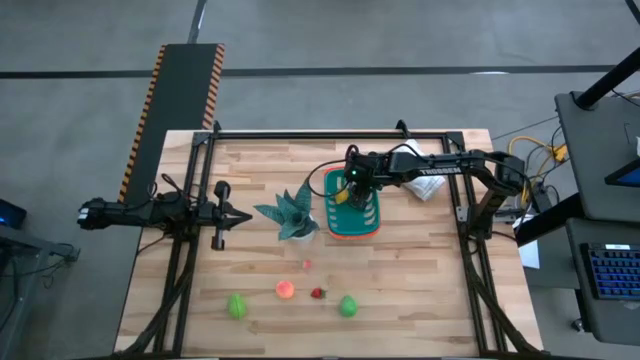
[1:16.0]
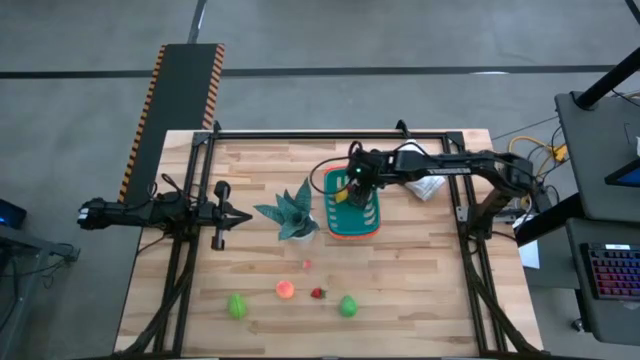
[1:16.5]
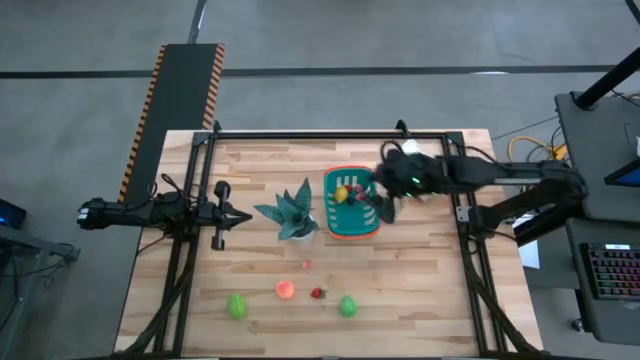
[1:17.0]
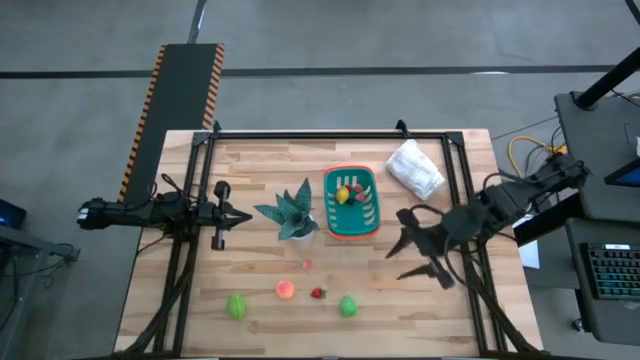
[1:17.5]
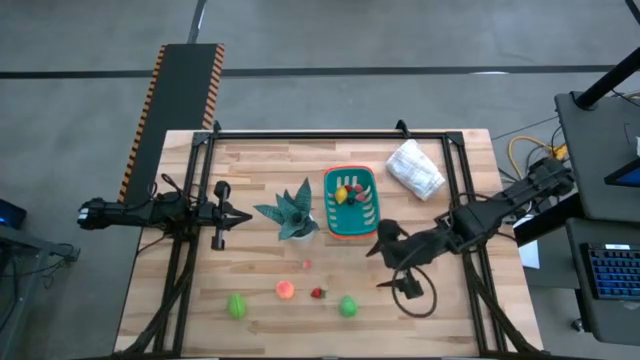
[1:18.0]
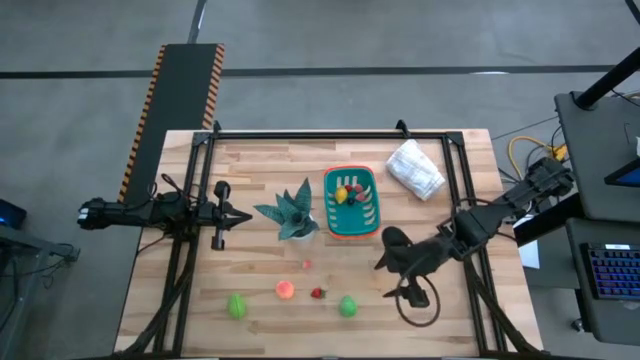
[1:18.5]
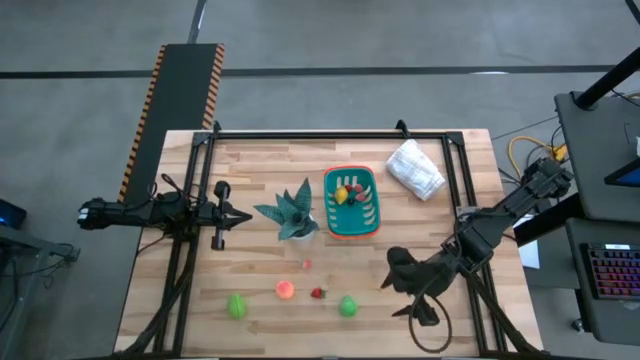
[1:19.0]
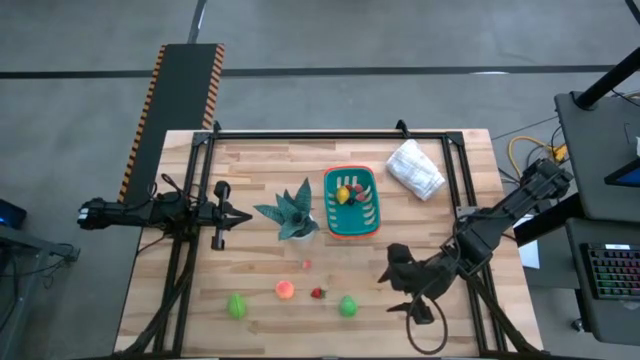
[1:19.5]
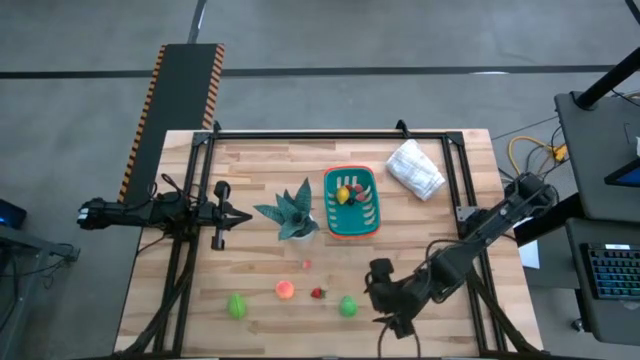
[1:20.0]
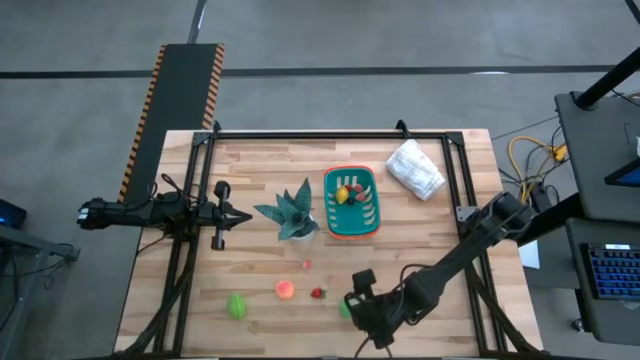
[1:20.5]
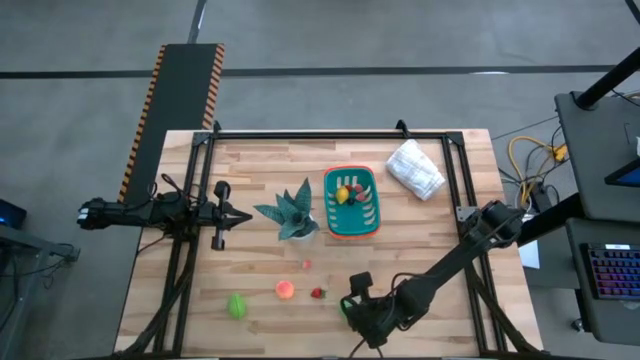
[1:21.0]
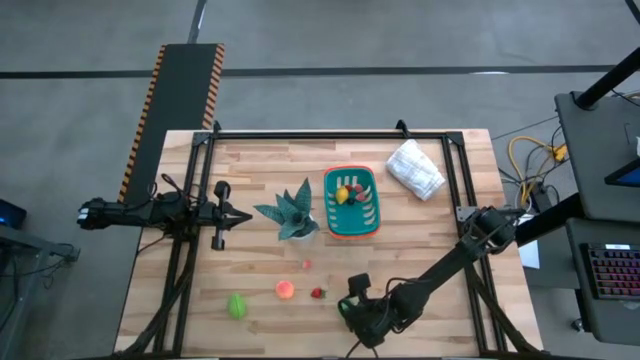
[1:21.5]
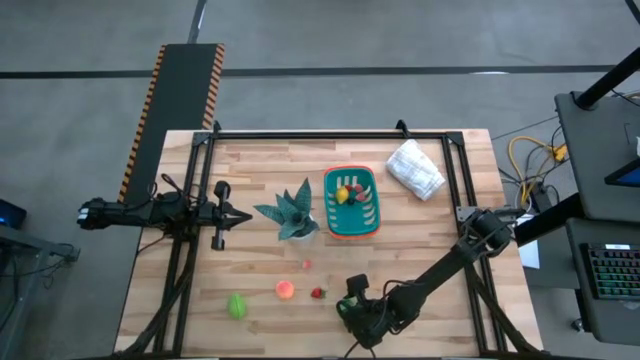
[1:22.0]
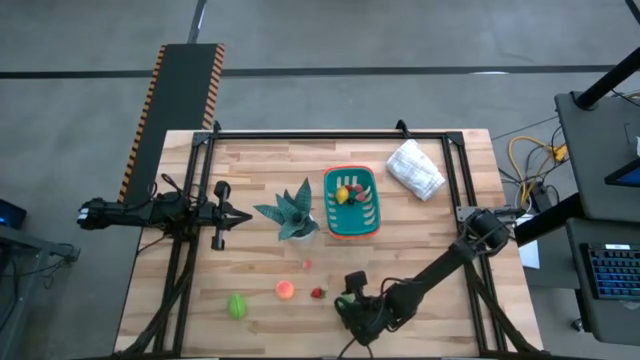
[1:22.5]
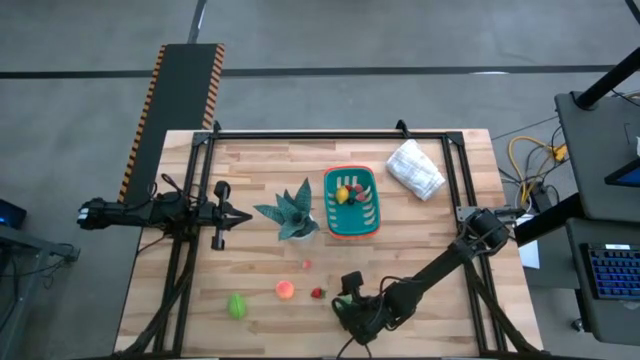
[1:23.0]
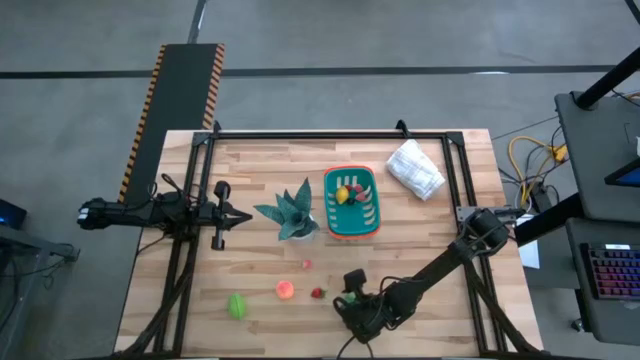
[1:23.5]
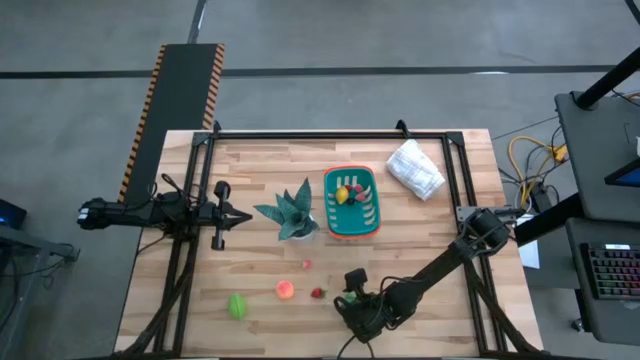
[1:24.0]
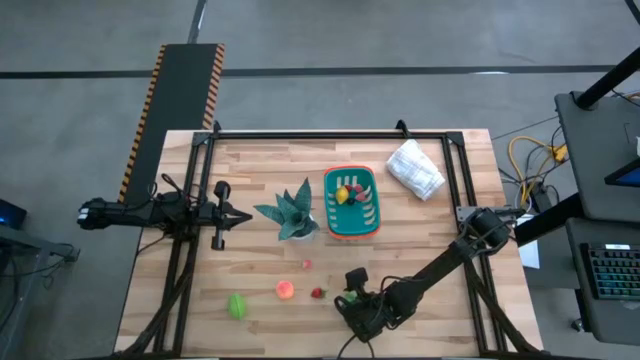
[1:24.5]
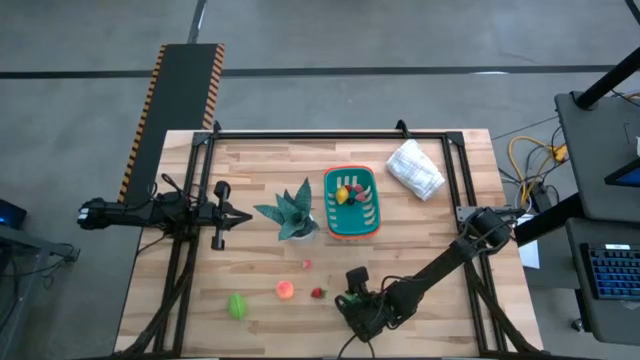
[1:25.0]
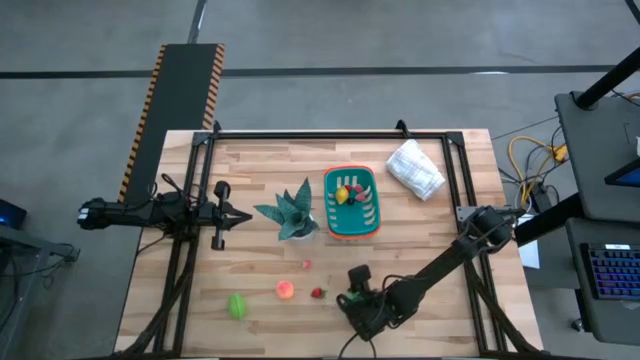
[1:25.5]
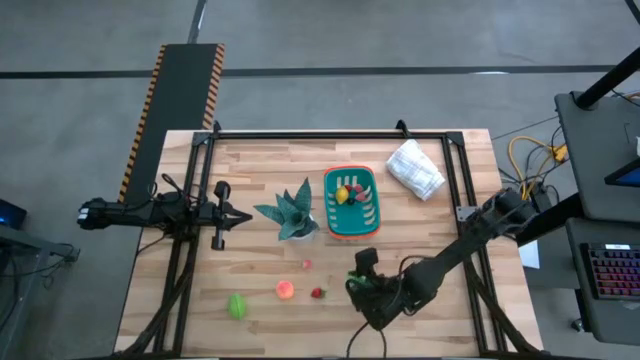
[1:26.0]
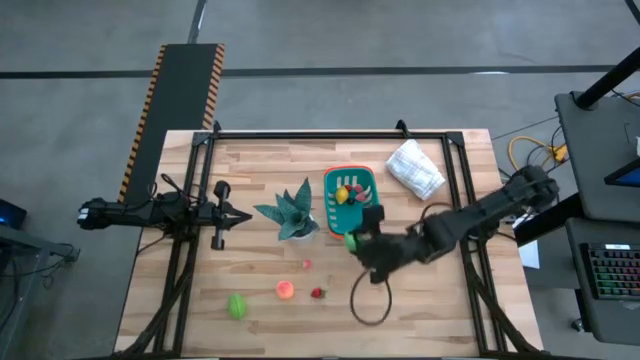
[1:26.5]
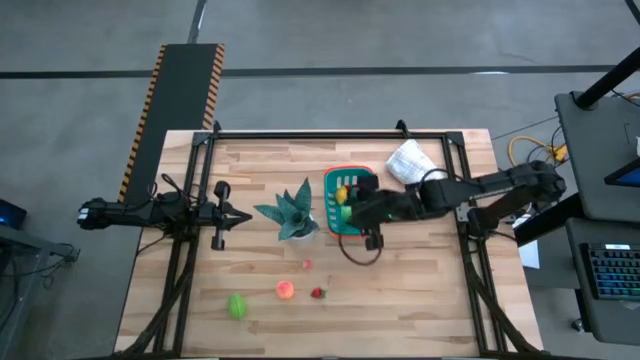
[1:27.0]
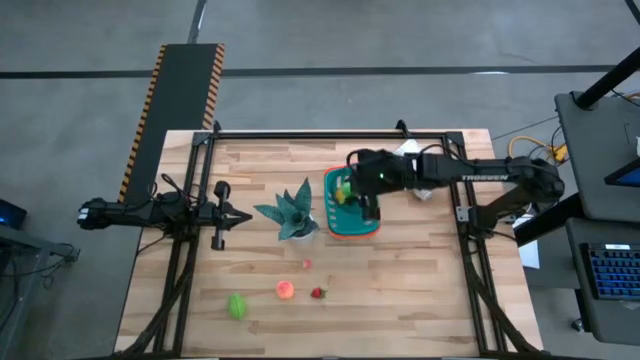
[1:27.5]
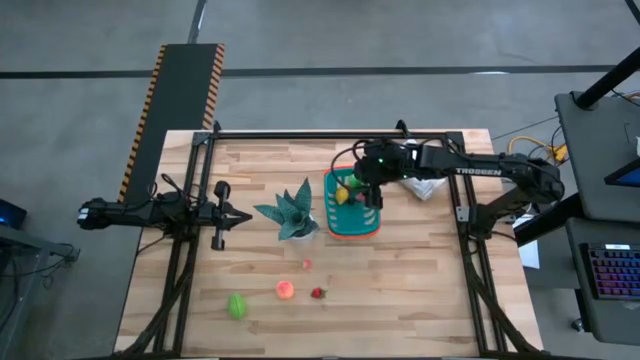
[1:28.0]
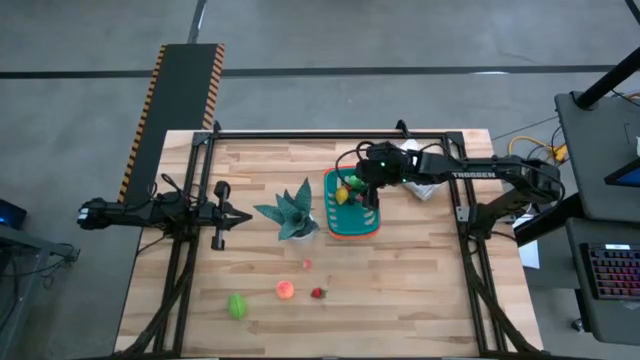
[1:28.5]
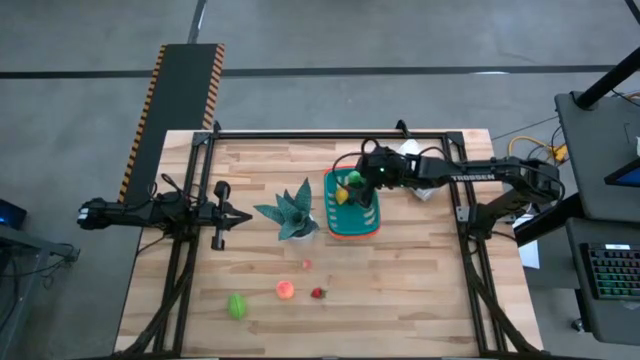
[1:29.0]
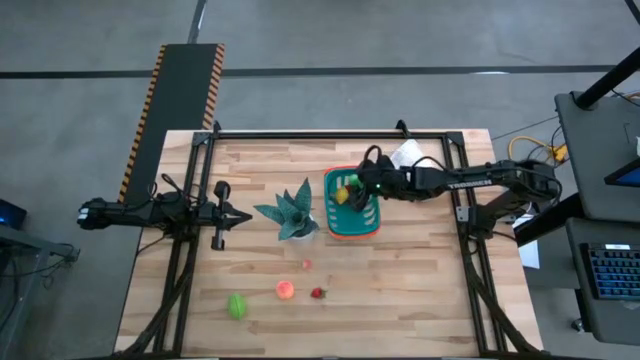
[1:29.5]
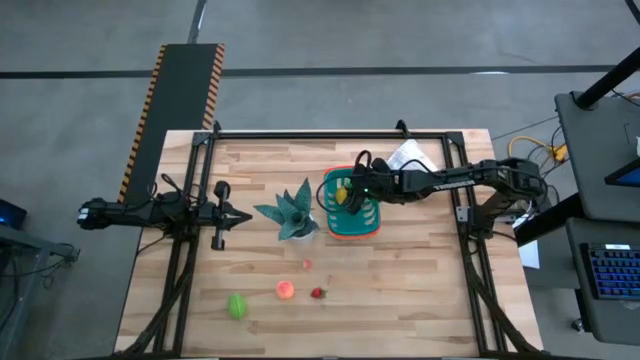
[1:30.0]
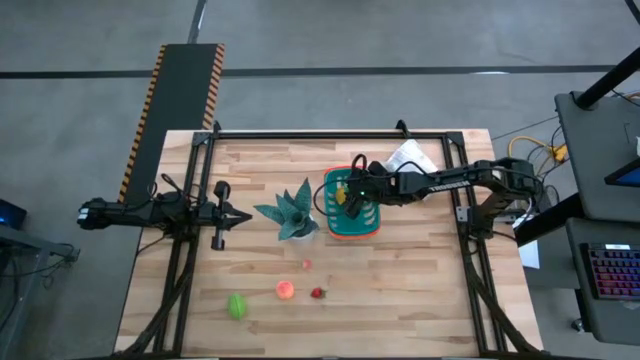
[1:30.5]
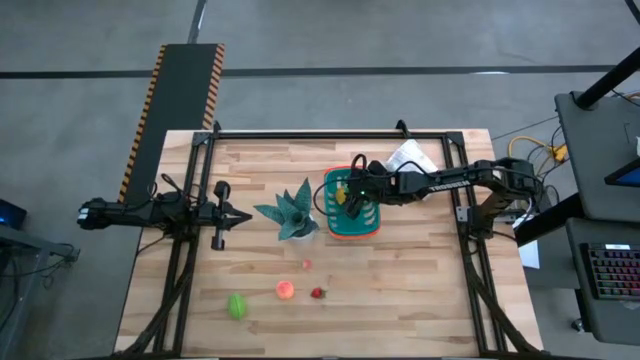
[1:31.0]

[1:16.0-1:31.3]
Task: Build produce basket
Put the pear into the basket

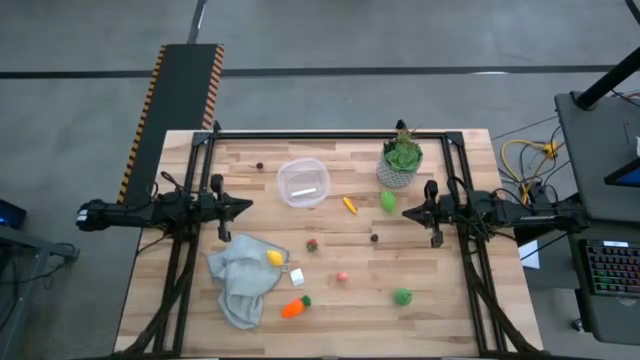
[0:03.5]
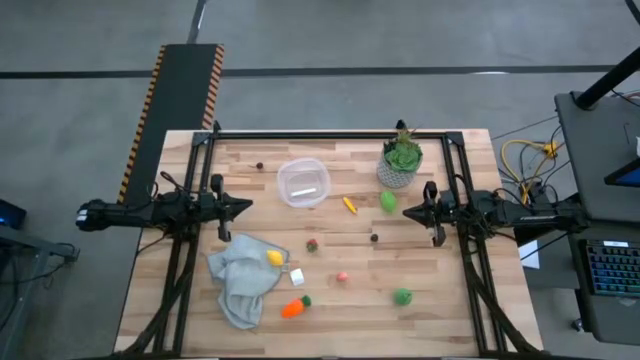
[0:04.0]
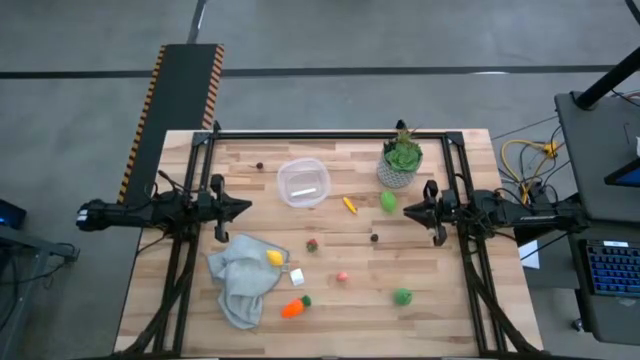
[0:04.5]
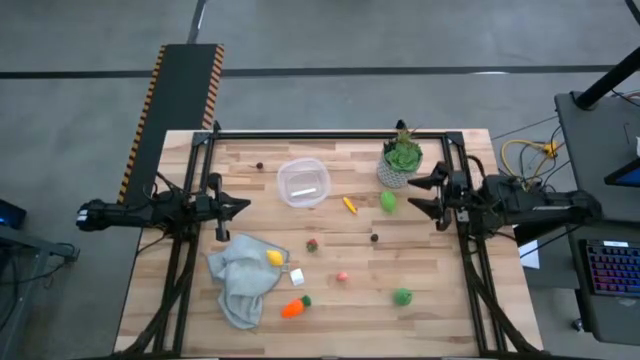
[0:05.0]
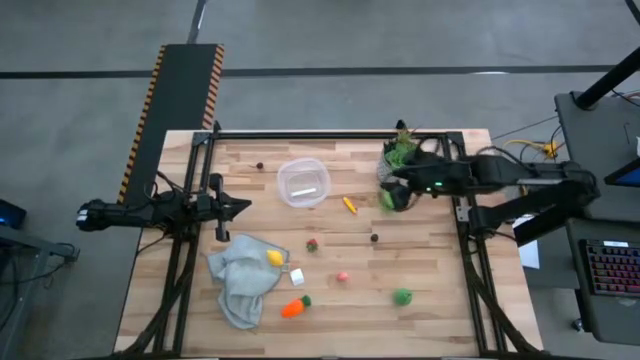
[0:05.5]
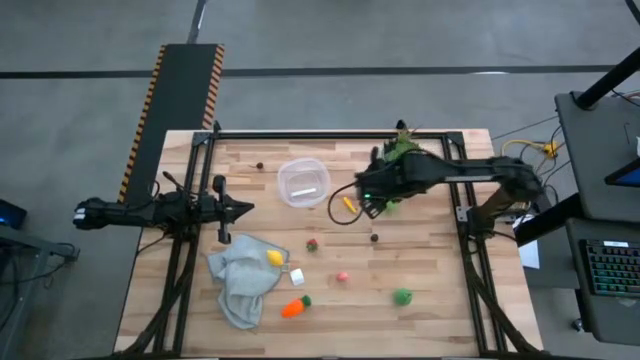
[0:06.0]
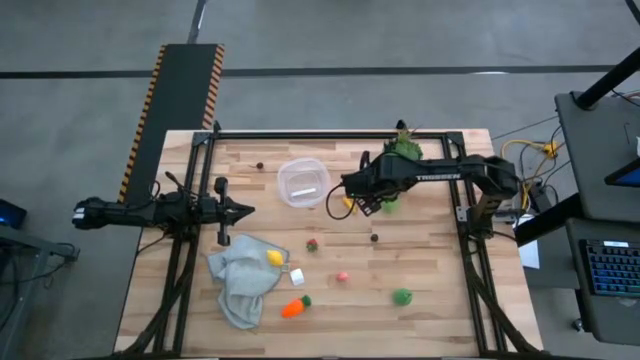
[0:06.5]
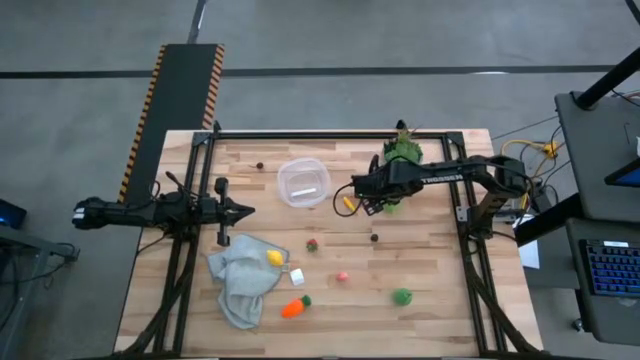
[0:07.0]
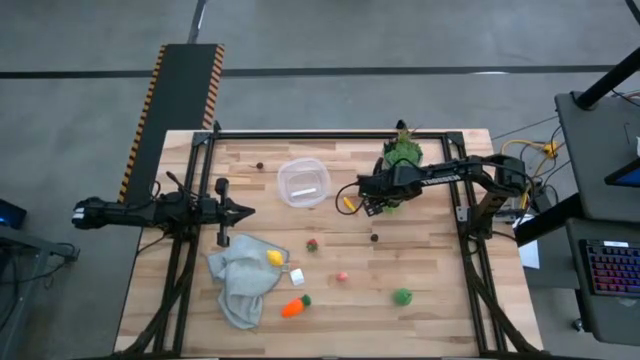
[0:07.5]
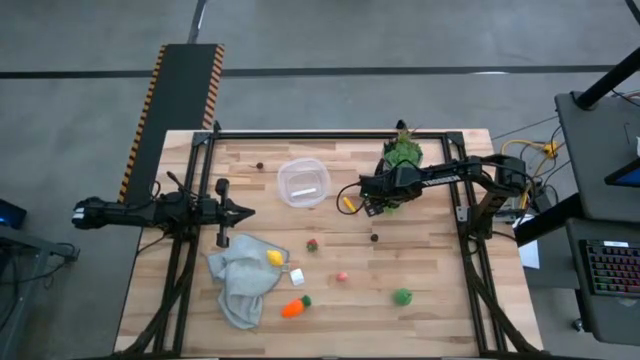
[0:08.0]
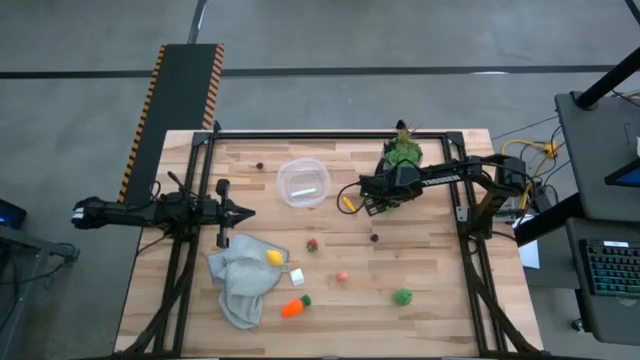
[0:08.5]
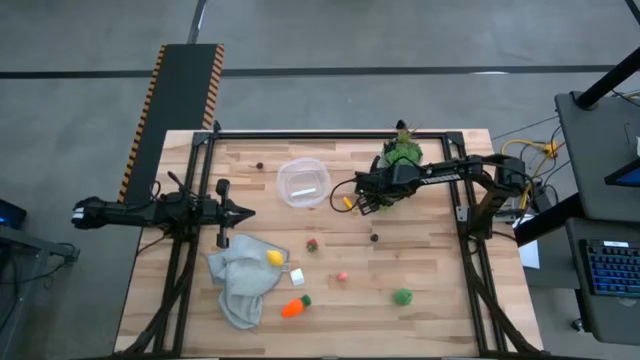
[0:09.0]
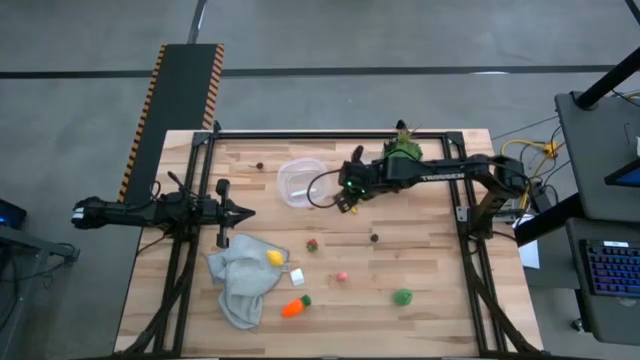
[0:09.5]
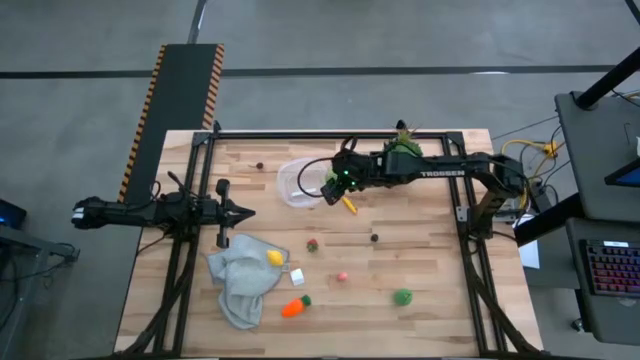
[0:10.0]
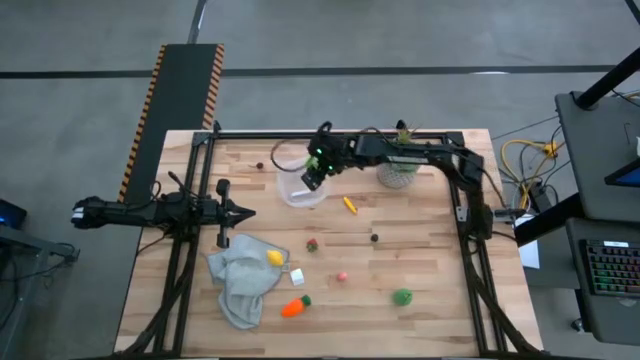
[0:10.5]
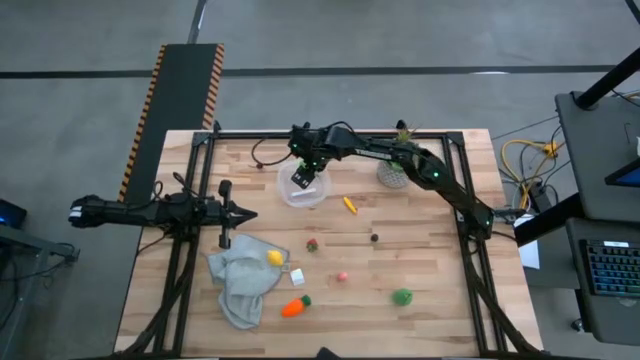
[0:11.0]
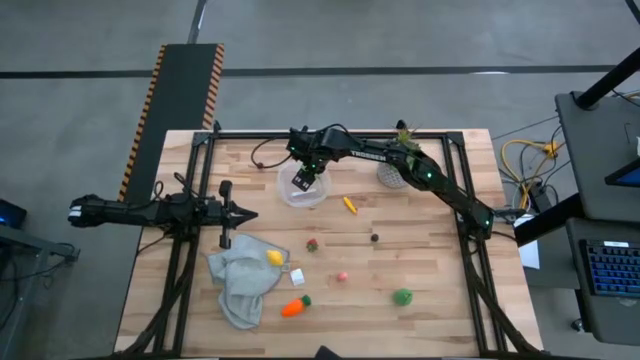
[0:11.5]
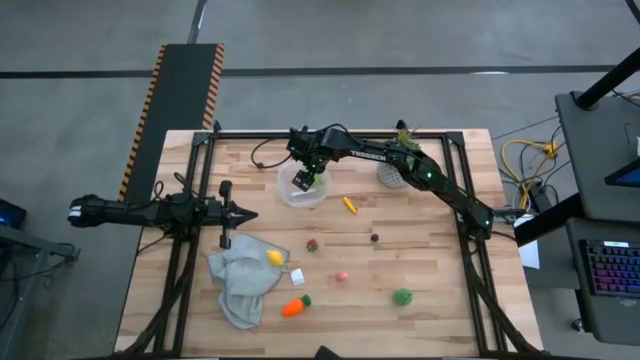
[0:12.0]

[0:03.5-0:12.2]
Task: Pick and placing Produce into tupperware
Put the green melon into the transparent bin
